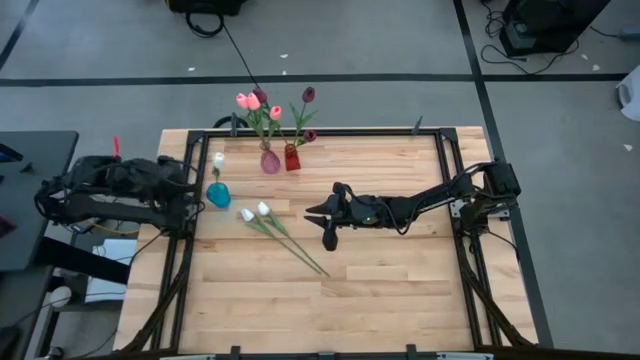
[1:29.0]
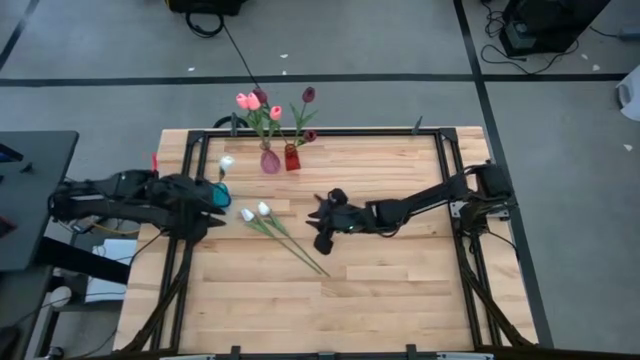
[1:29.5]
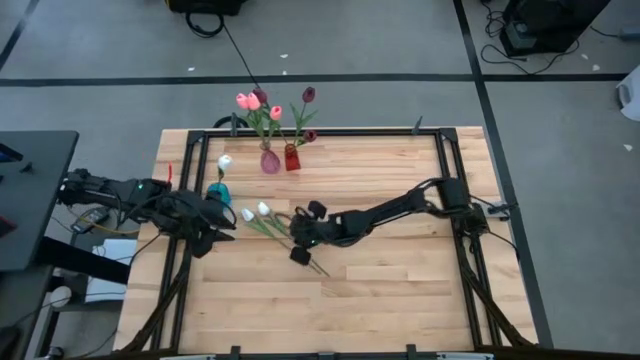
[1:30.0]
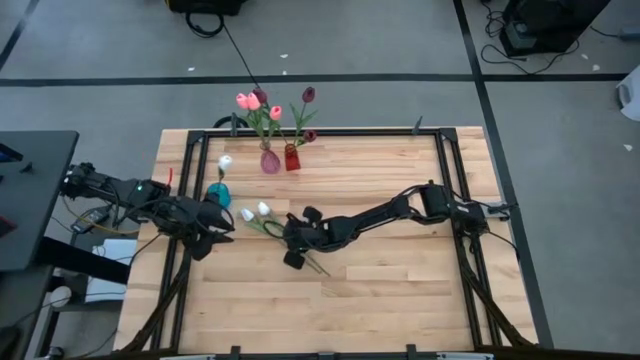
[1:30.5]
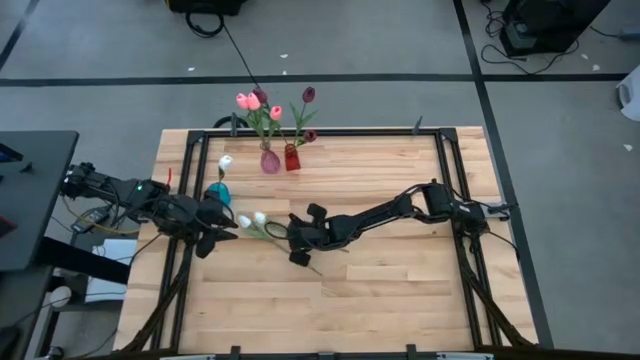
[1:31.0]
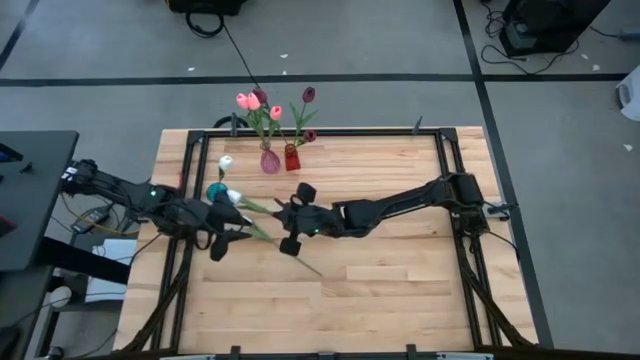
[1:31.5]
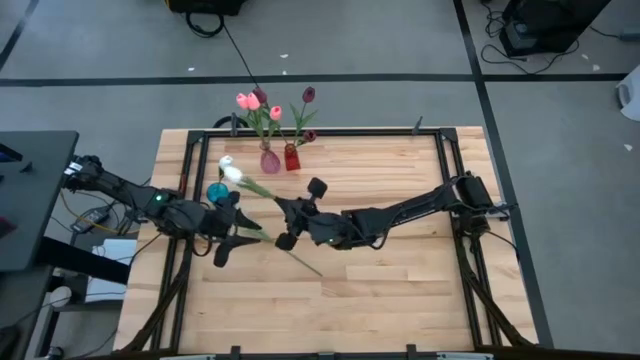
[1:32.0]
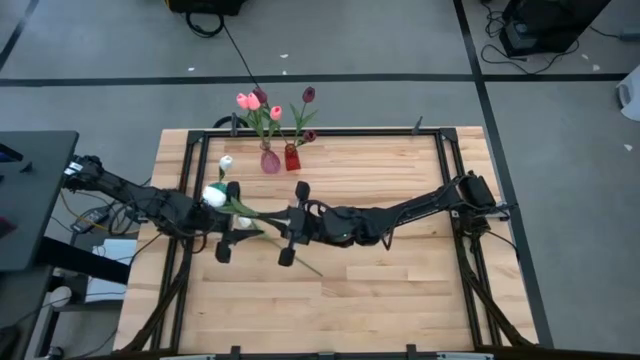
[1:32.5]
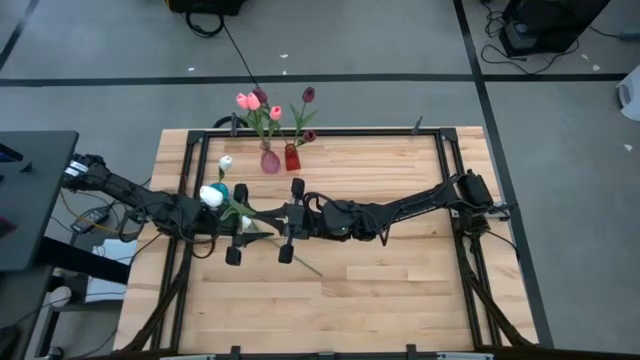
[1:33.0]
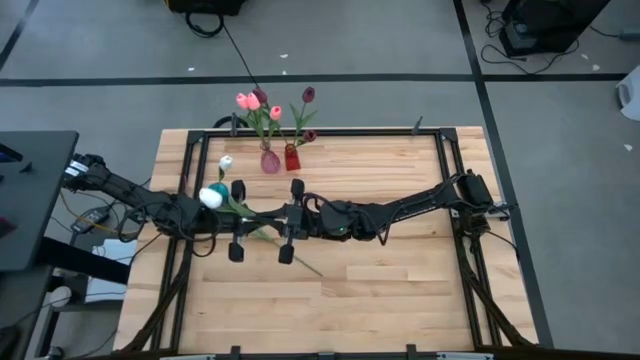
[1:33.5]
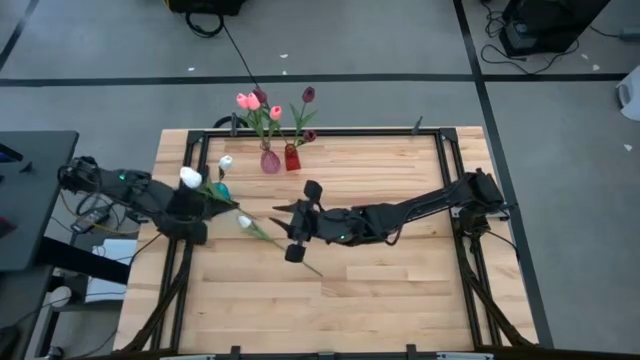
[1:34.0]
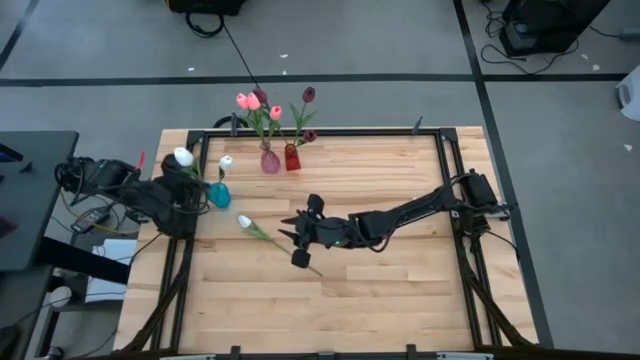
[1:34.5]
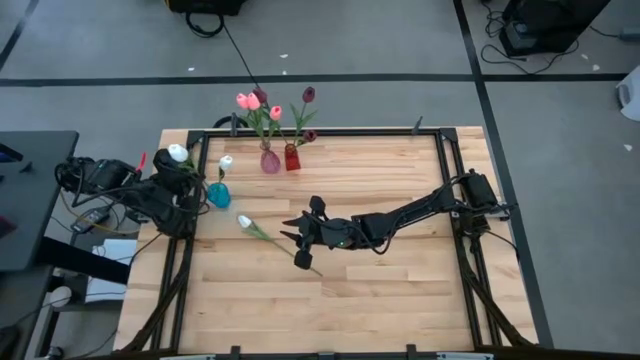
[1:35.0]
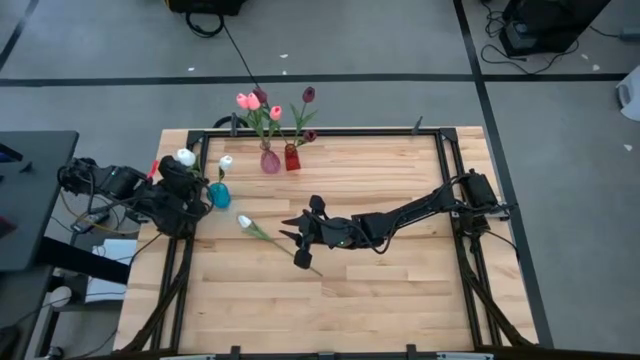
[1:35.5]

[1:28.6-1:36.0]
Task: Sort flowers into vase by color
Put the white flower into the blue vase

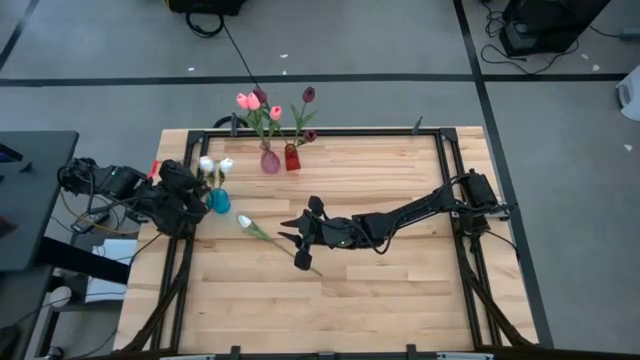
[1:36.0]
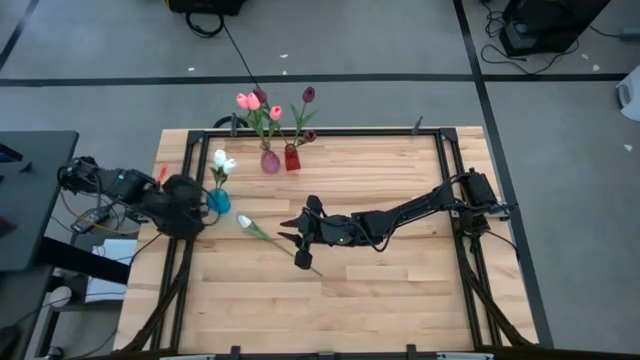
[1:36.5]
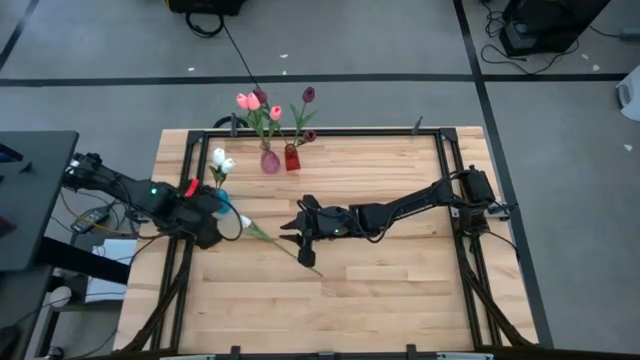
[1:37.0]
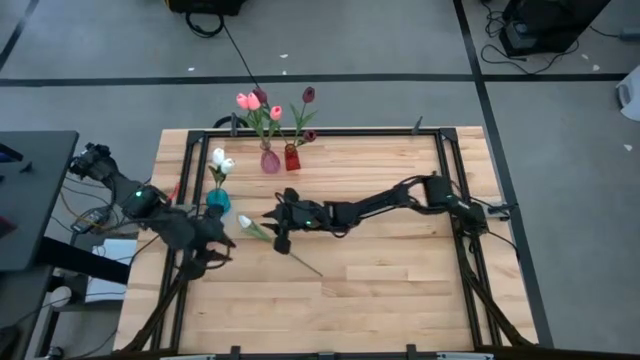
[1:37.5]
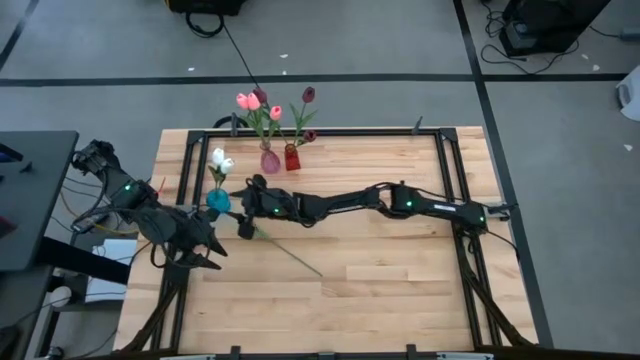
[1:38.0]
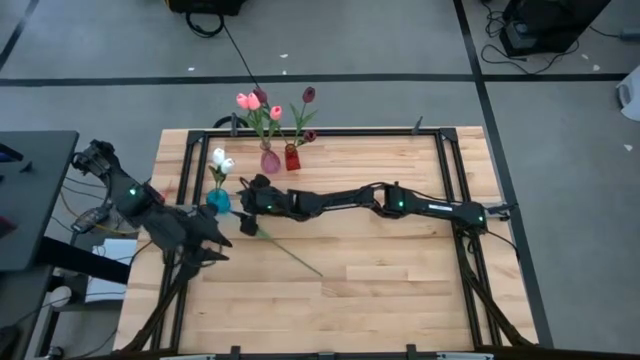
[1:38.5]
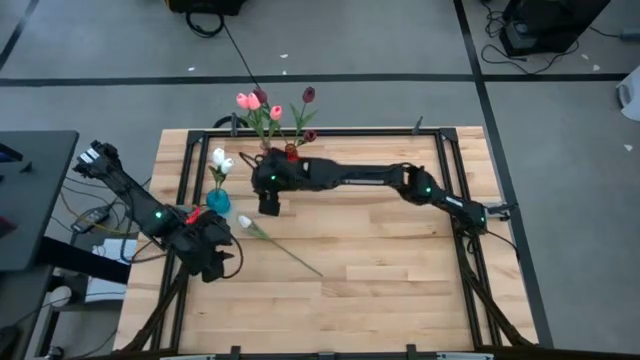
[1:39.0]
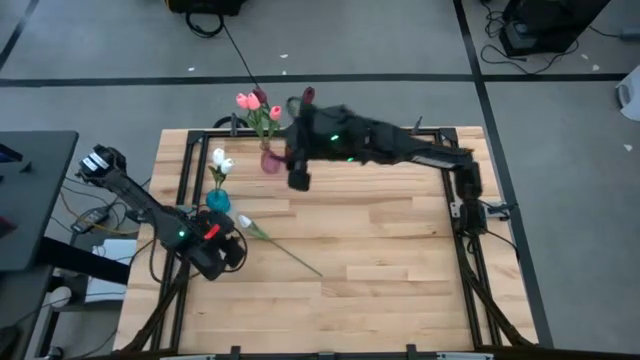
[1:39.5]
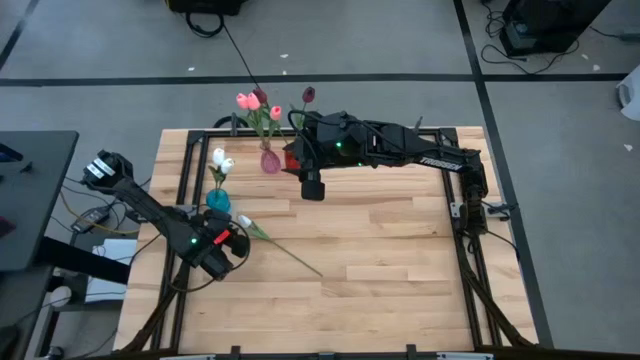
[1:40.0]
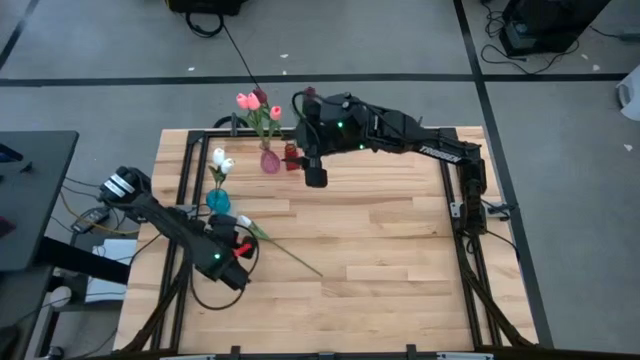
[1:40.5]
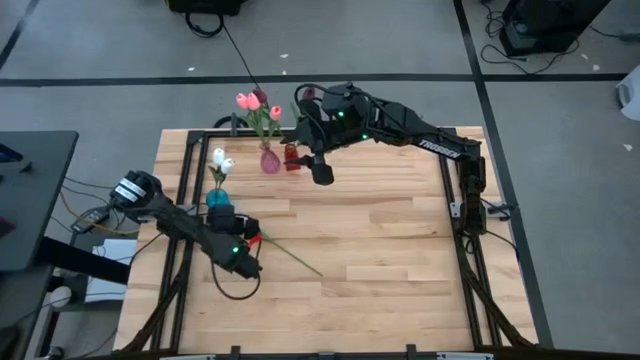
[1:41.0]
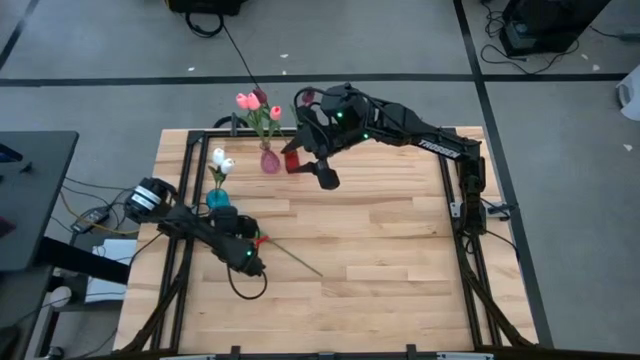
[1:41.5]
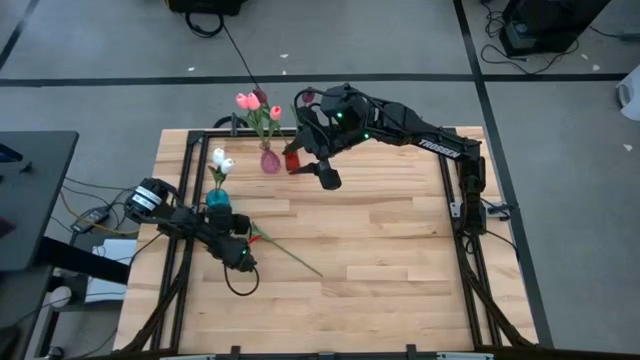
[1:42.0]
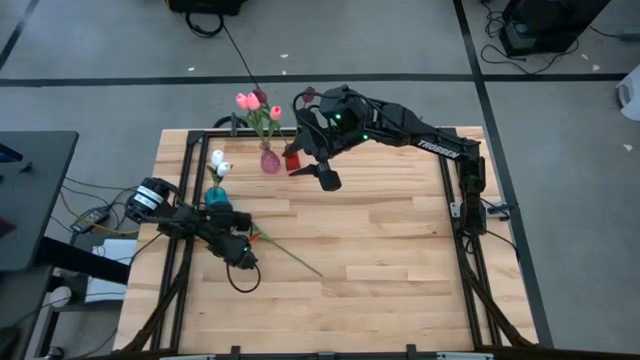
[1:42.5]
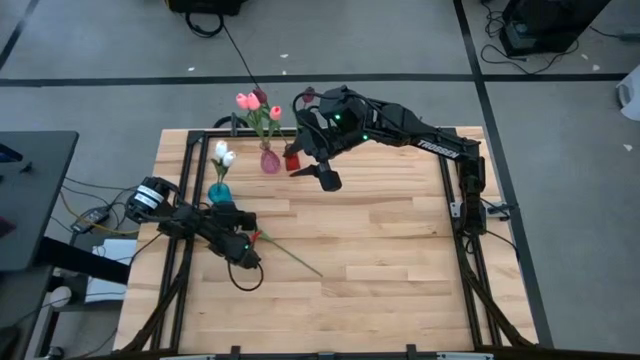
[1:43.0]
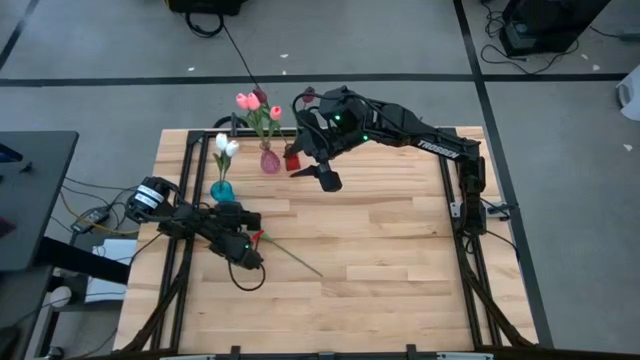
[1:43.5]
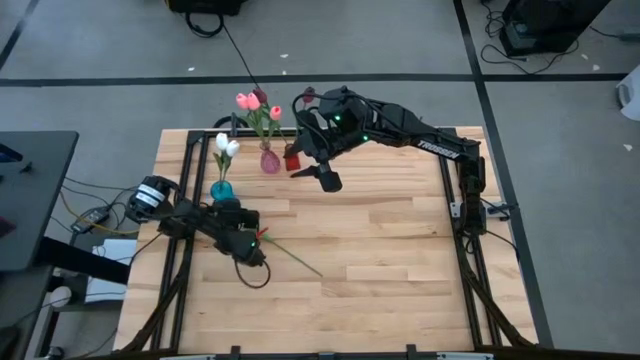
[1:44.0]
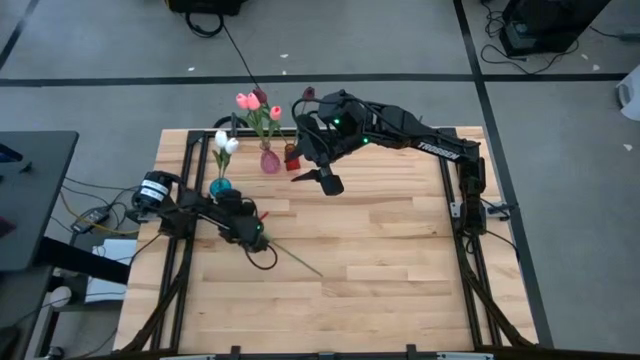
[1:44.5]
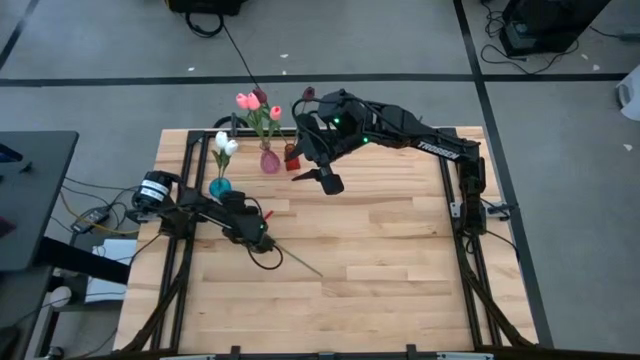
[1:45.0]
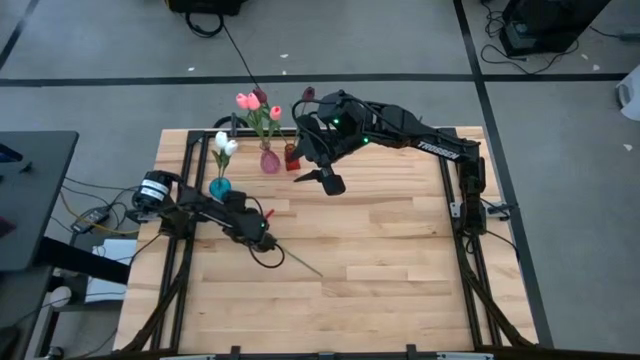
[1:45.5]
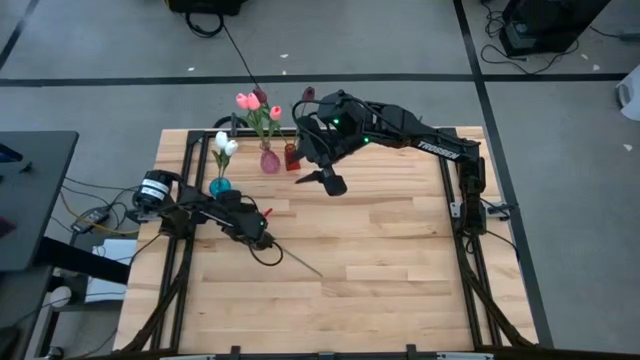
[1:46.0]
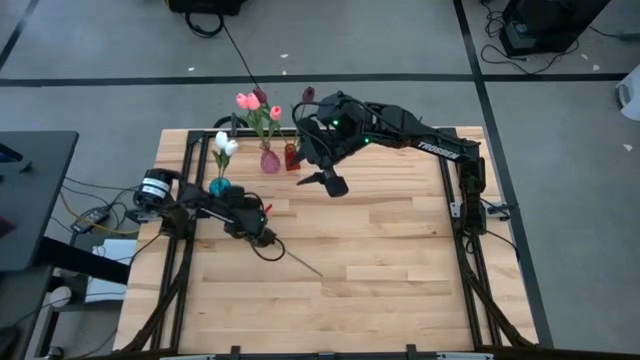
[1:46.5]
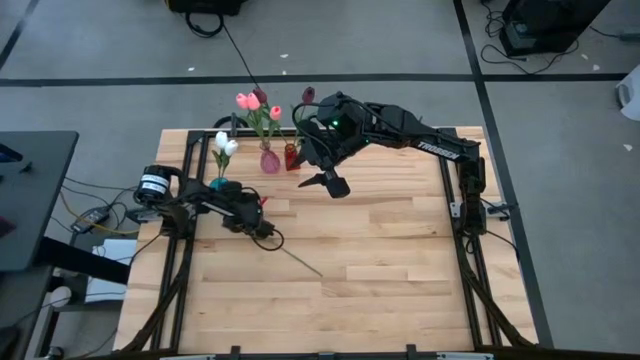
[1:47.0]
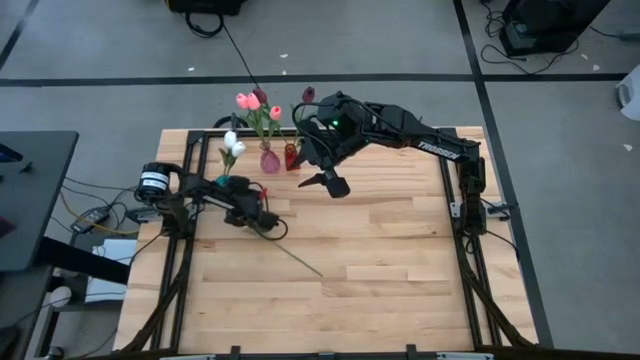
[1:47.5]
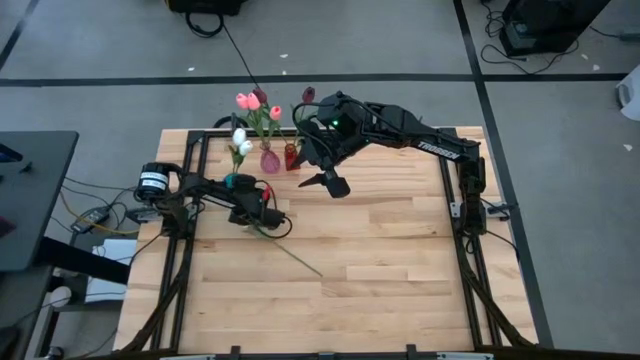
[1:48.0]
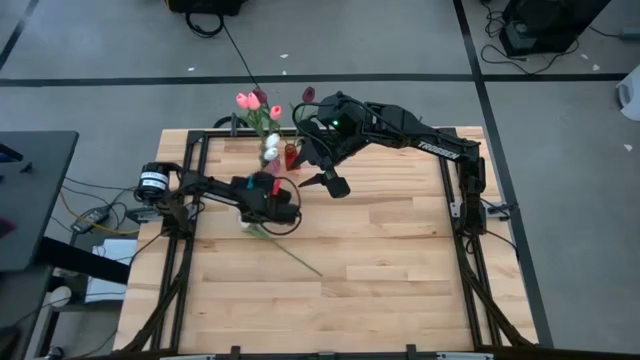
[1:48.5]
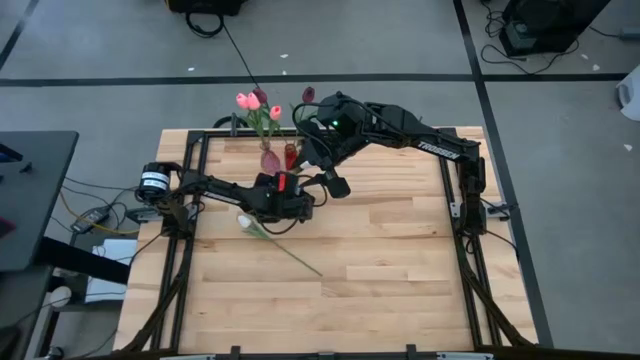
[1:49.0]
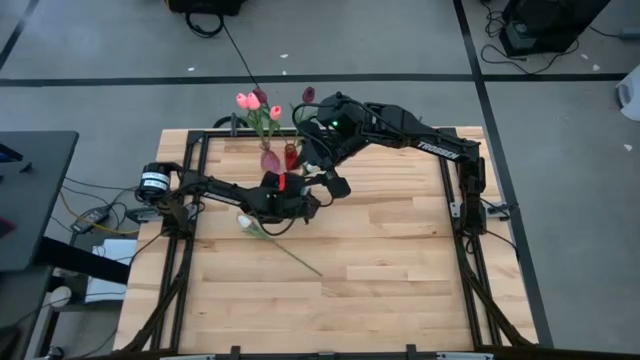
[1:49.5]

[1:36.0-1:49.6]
Move the blue vase from top left to top center of the table

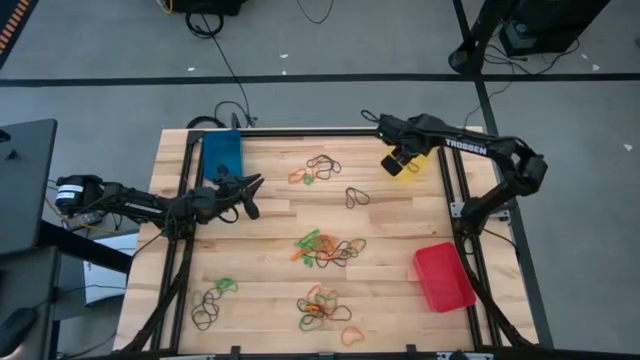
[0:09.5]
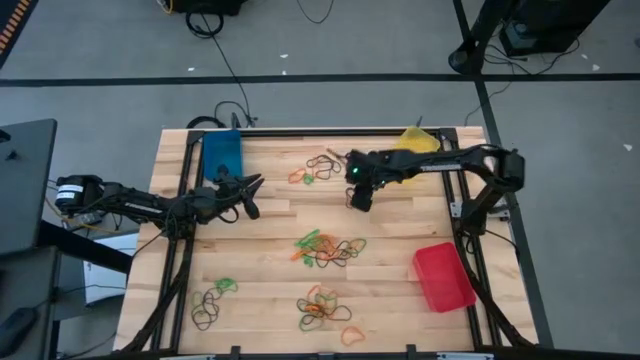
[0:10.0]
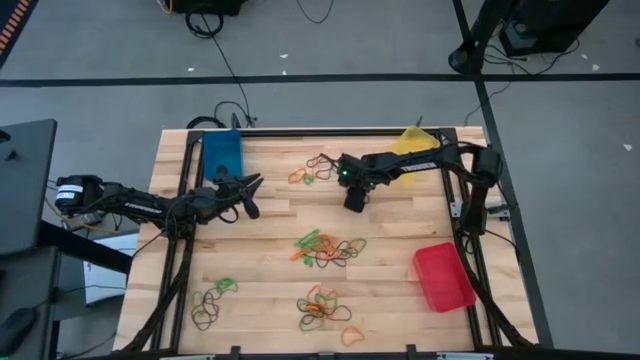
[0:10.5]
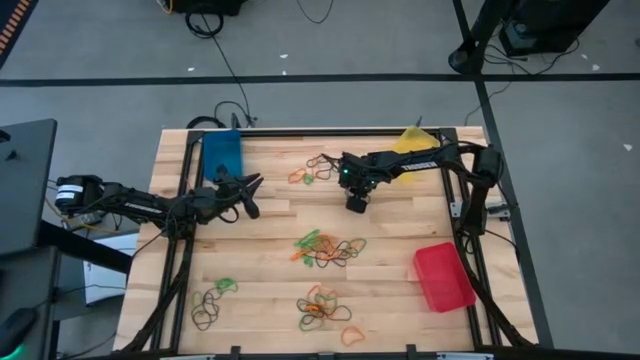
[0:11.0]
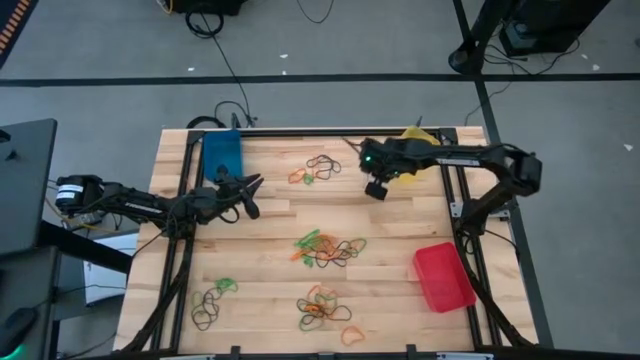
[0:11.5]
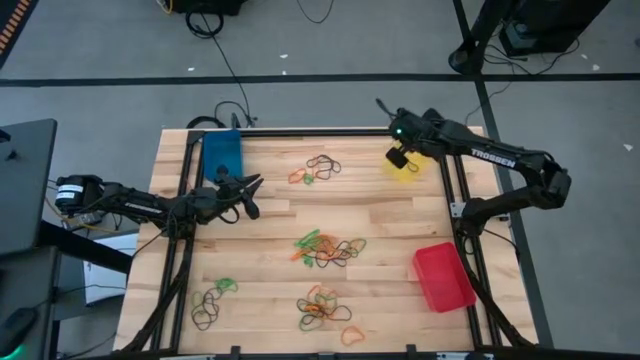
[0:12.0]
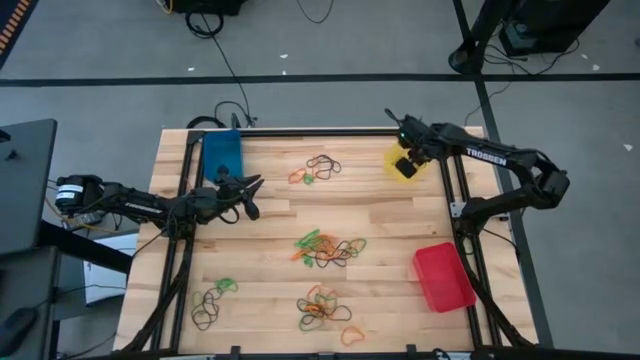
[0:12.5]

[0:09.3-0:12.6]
Task: Sort rubber bands into baskets
Put the brown rubber band into the yellow bin
